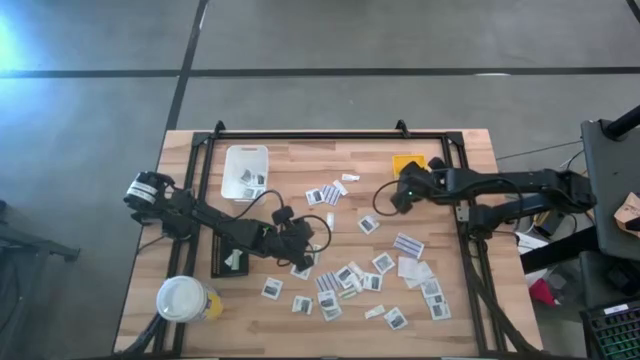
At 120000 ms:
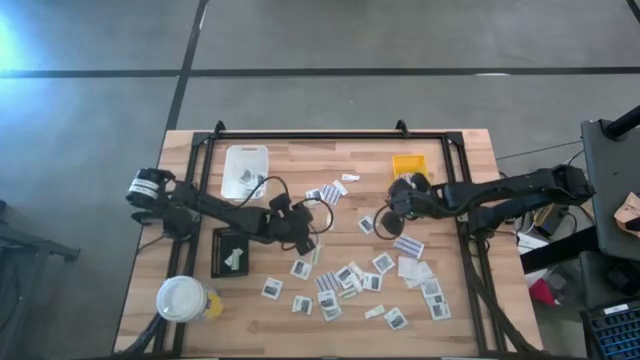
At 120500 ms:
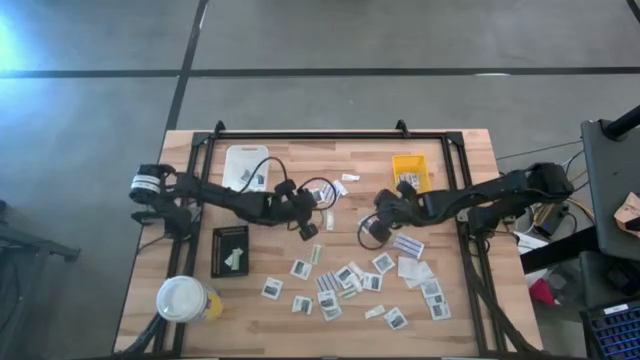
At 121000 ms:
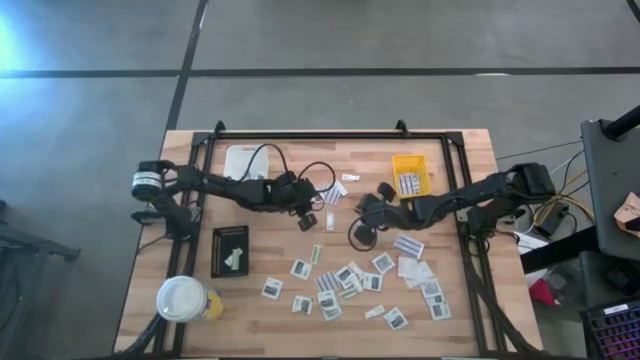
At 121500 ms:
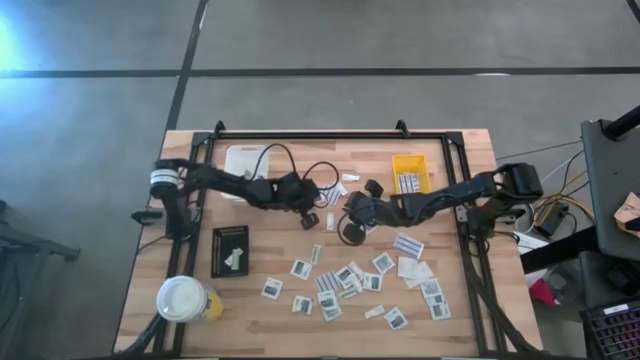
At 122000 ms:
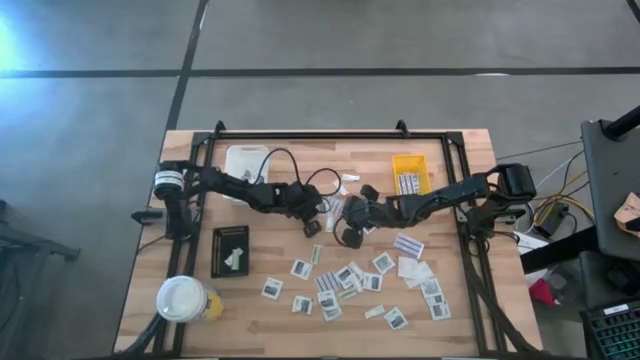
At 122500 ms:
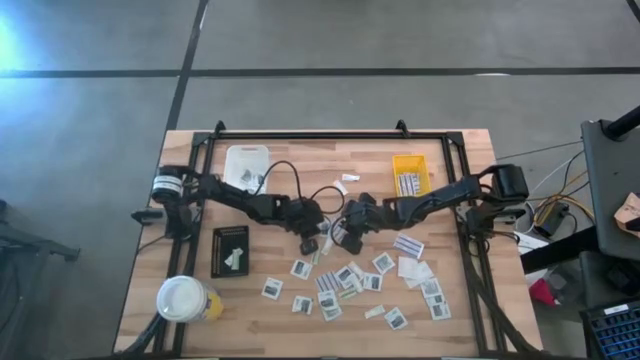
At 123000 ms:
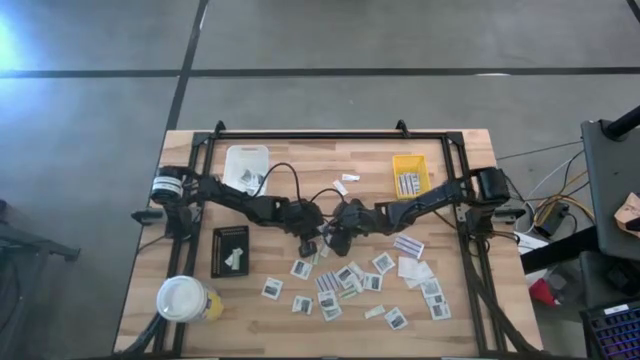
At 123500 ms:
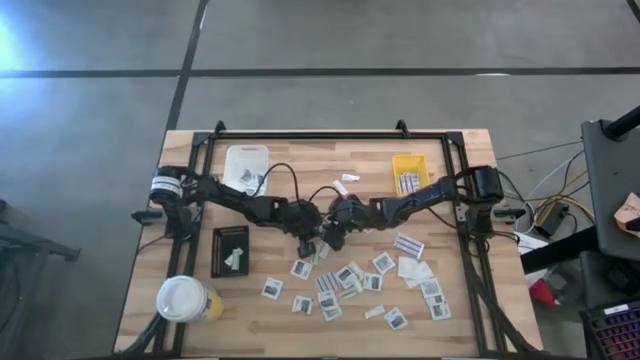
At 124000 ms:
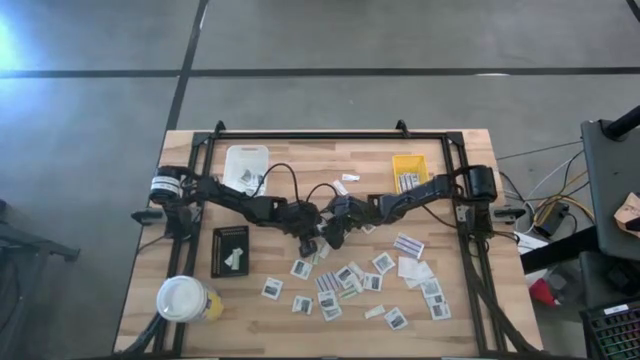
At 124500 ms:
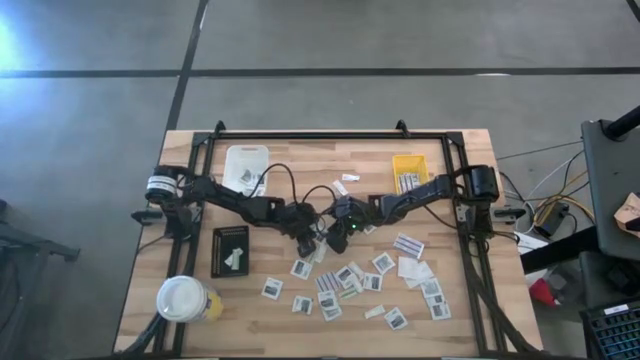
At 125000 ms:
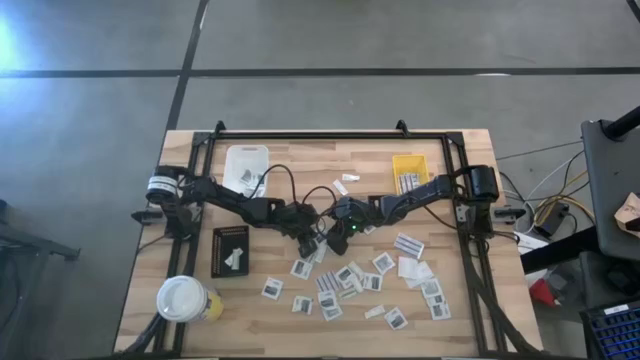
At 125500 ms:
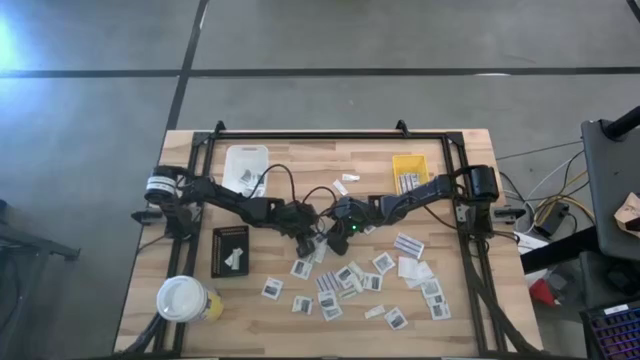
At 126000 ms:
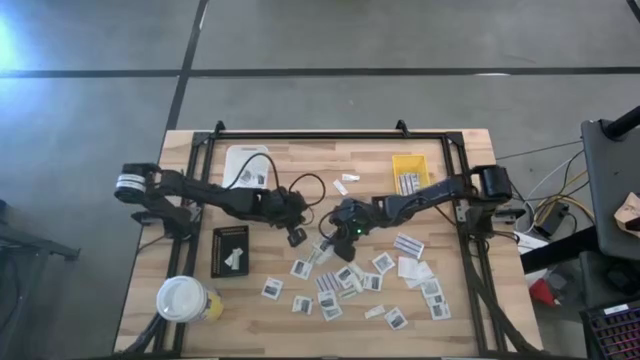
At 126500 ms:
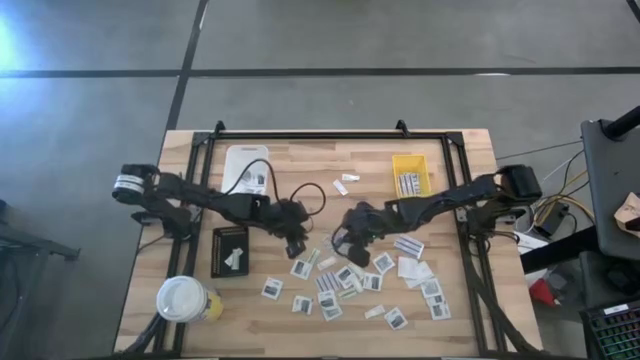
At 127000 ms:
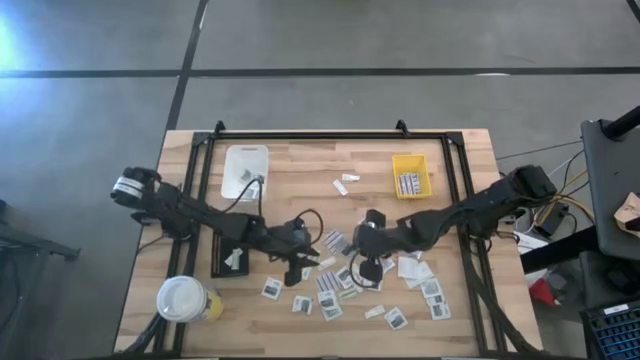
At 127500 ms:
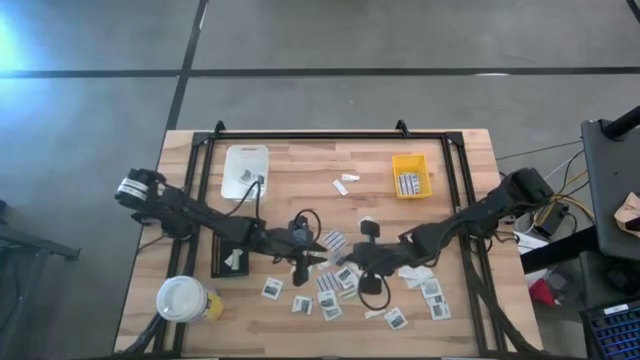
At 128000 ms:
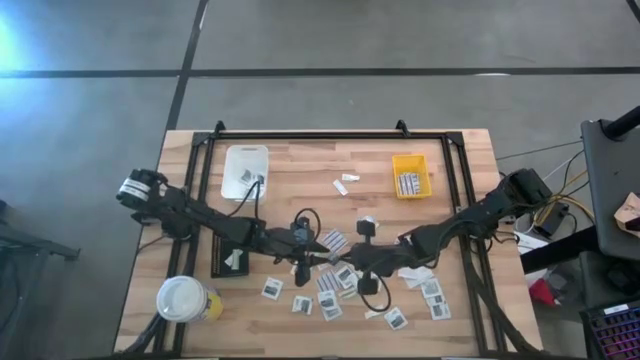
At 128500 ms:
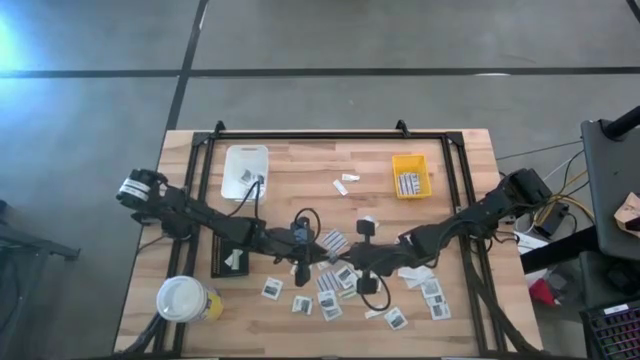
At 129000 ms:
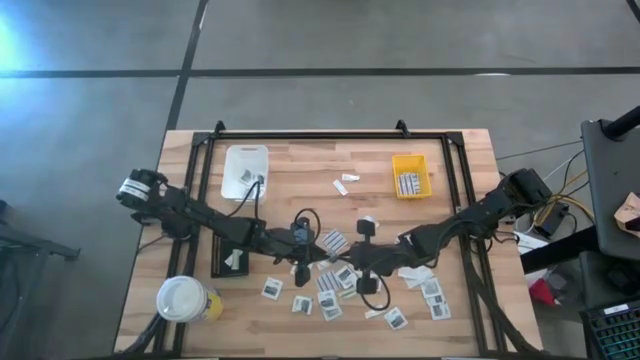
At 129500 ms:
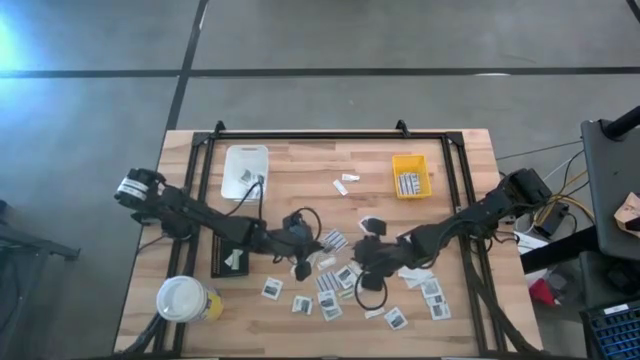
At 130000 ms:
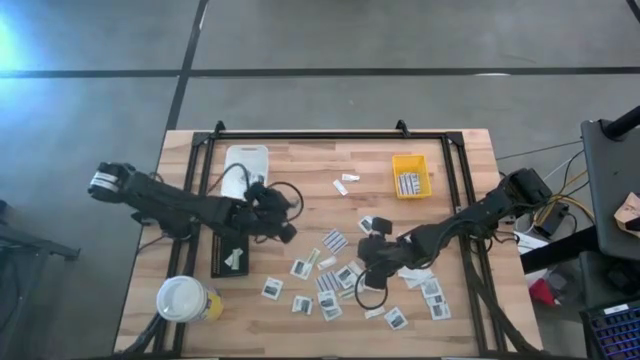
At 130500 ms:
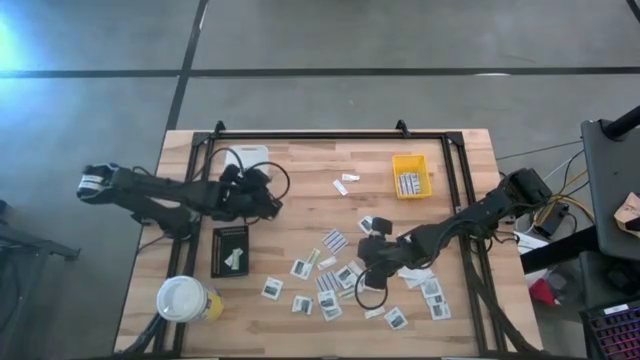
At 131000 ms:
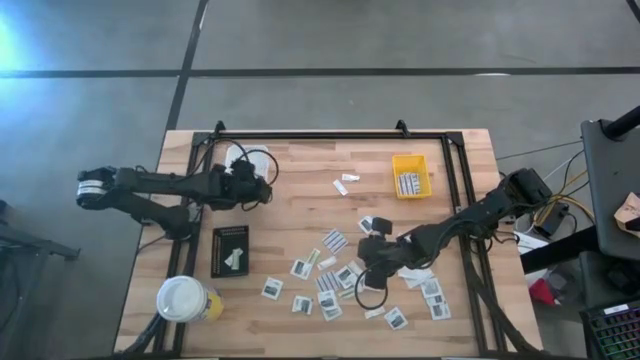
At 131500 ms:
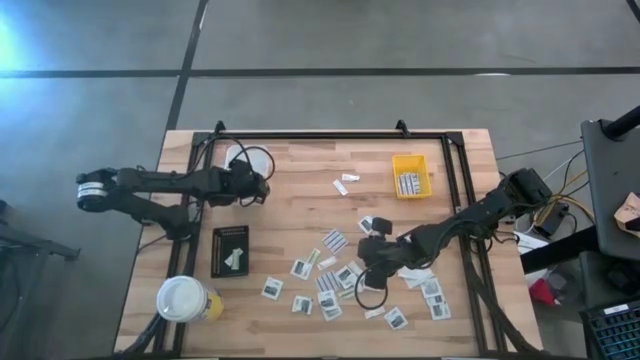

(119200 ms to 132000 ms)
Task: Pick & Place First Aid Supplies
Put the gray towelette pack into the white bin

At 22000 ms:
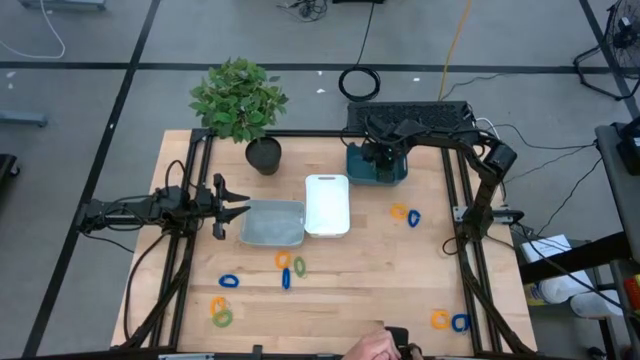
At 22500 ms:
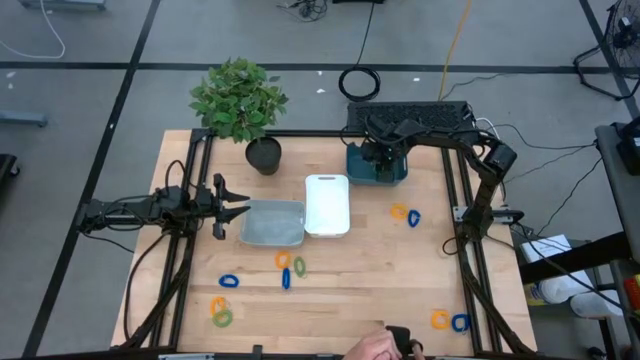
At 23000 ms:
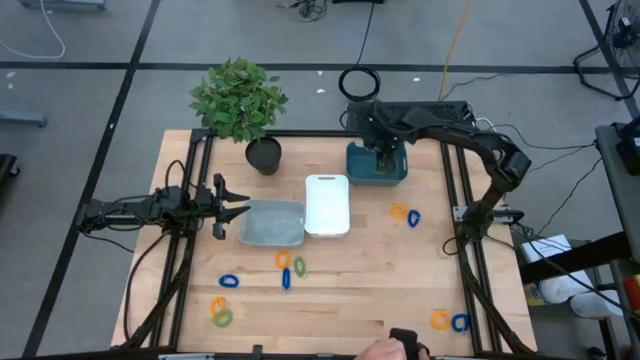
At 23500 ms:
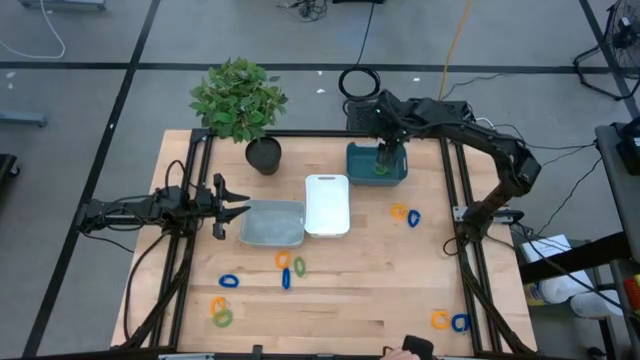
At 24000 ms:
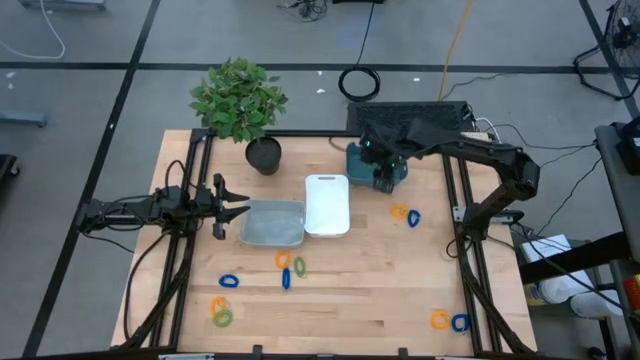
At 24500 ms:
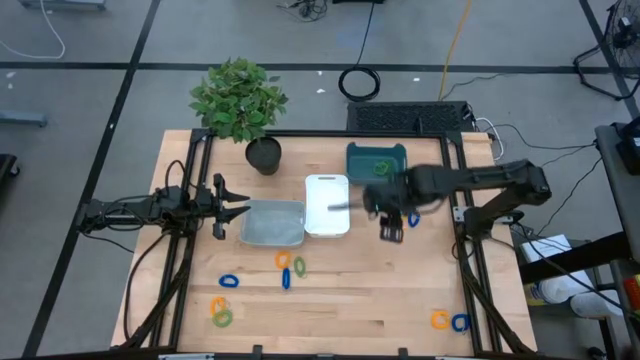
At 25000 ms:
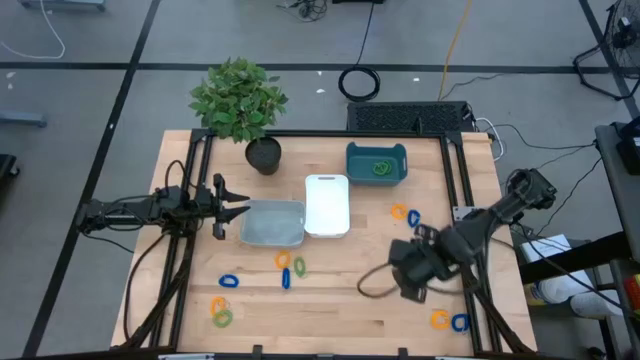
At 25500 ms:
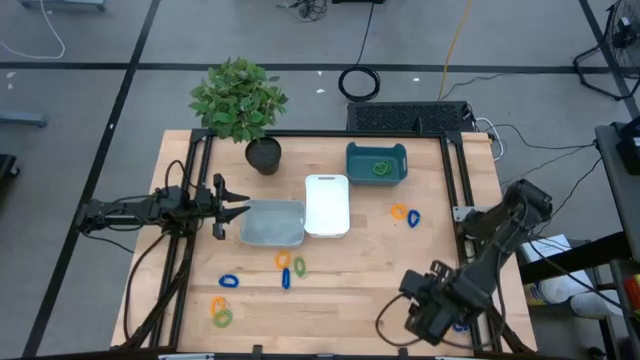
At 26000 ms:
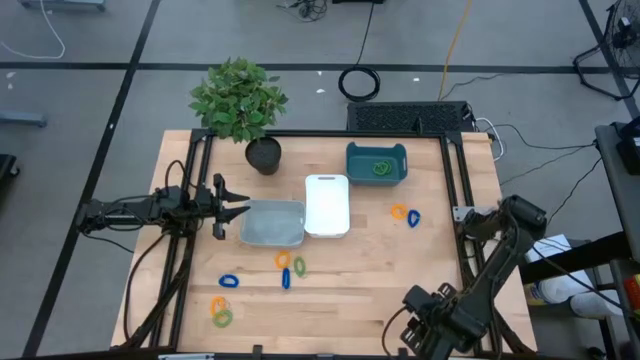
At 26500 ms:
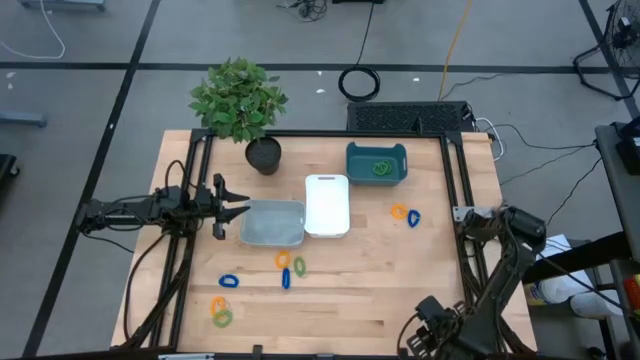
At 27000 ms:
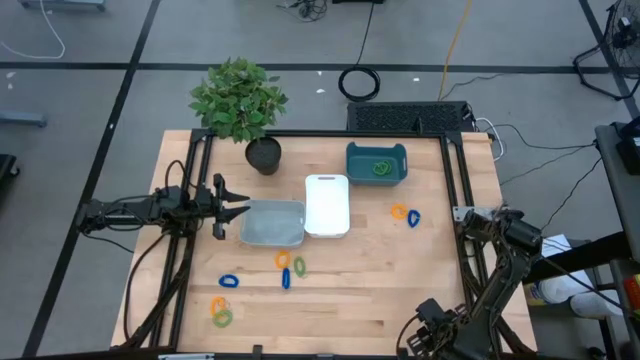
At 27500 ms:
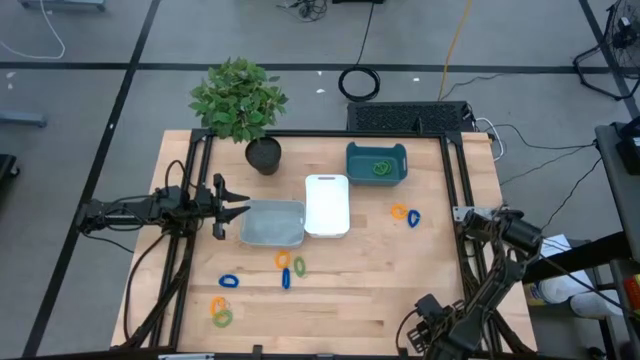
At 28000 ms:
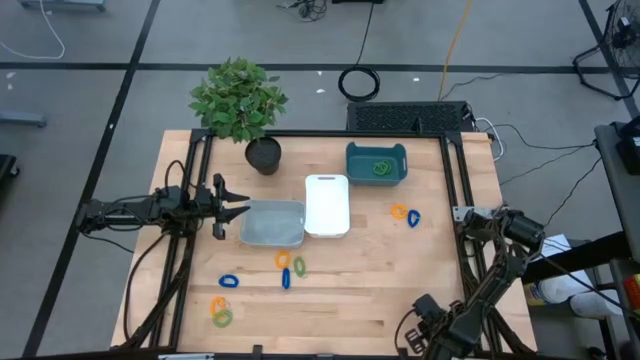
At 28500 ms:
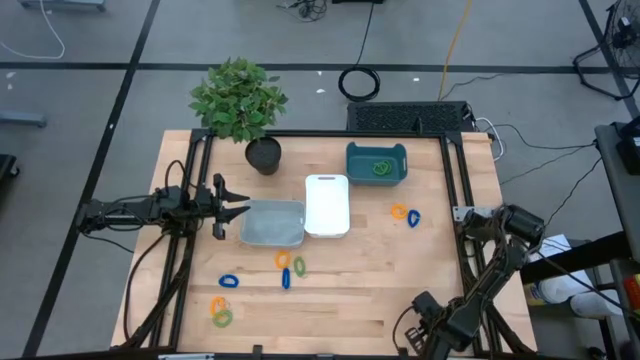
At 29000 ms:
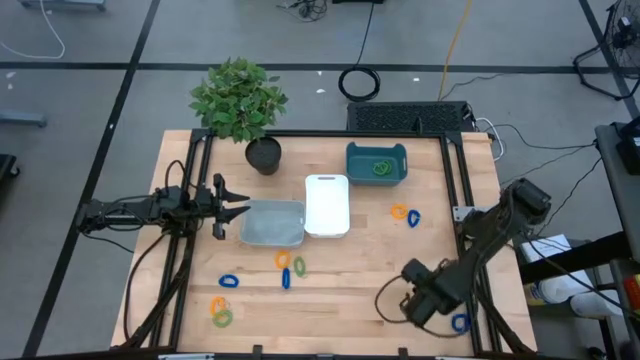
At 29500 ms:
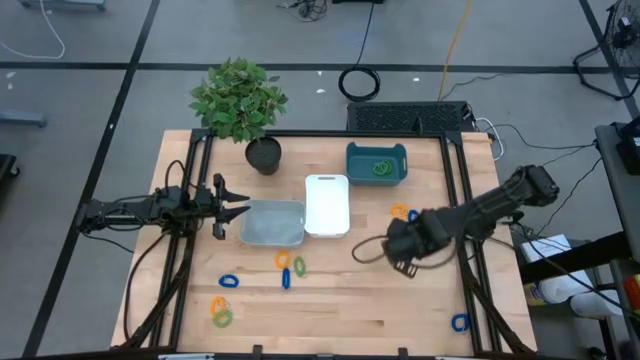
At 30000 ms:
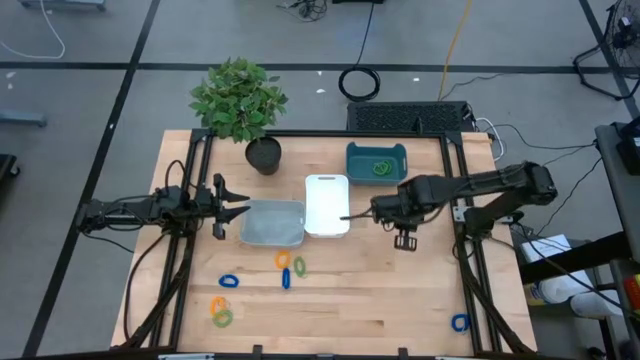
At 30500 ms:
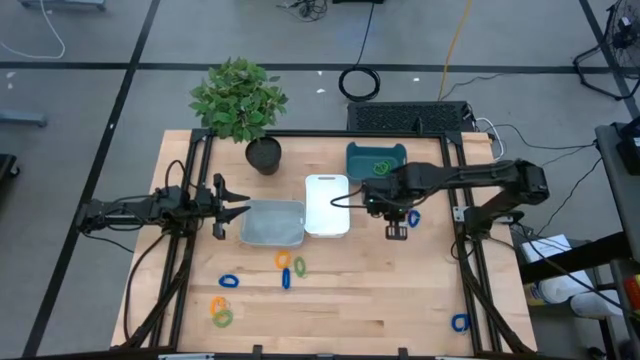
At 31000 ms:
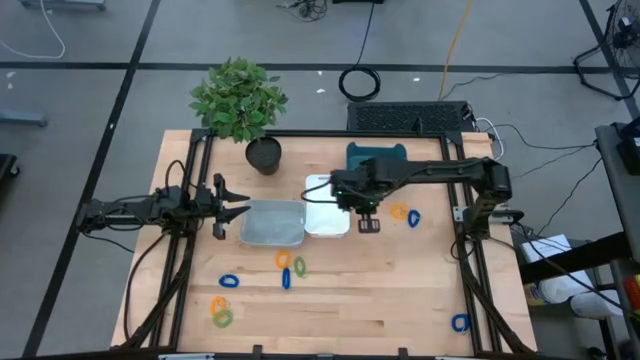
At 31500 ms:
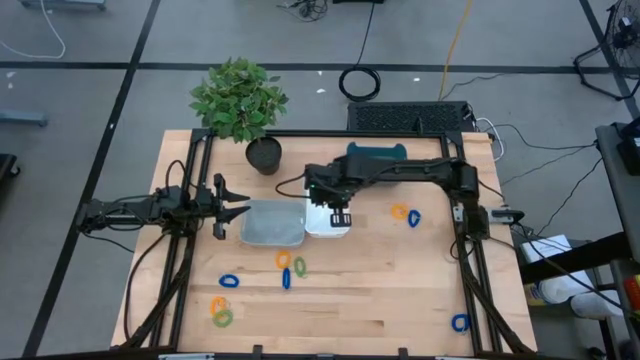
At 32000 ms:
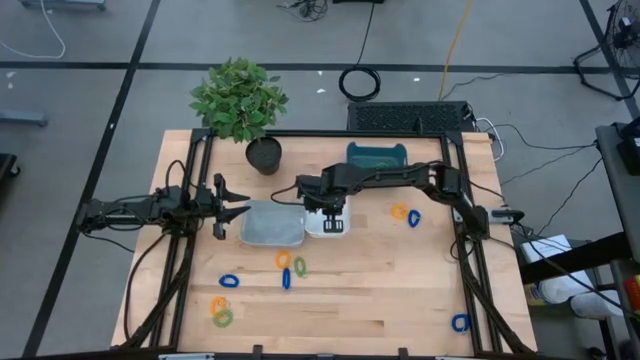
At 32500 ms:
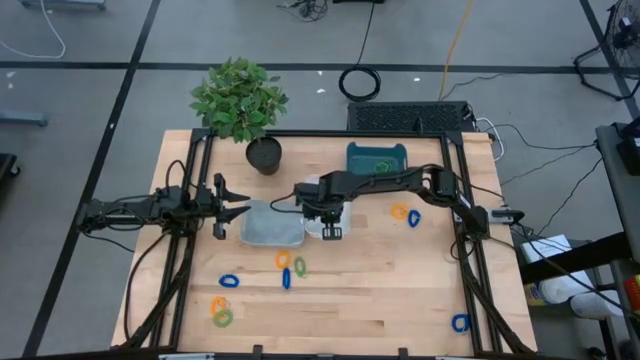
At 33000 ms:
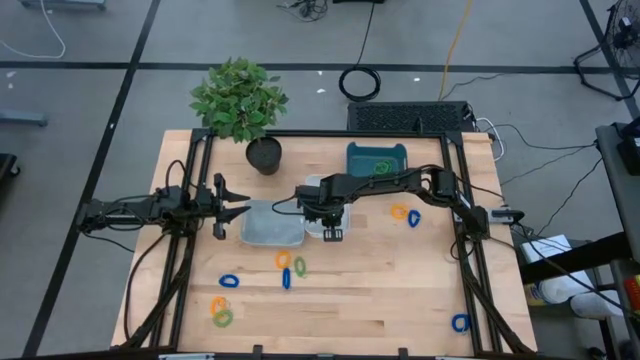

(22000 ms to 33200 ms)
Task: Sort spring keychains
Put the yellow spring keychain into the white bin
